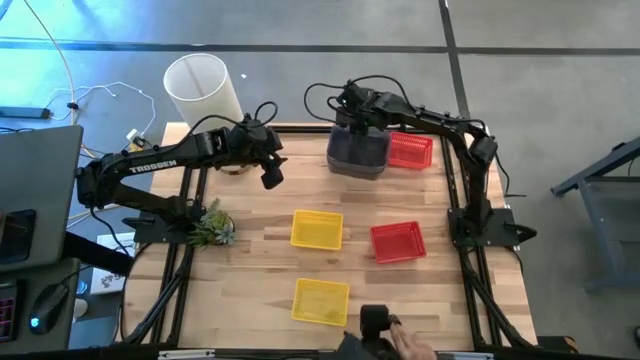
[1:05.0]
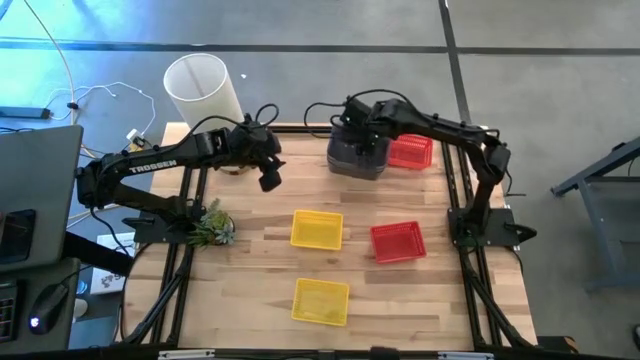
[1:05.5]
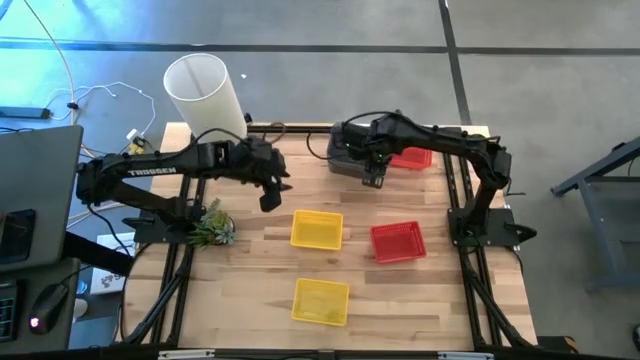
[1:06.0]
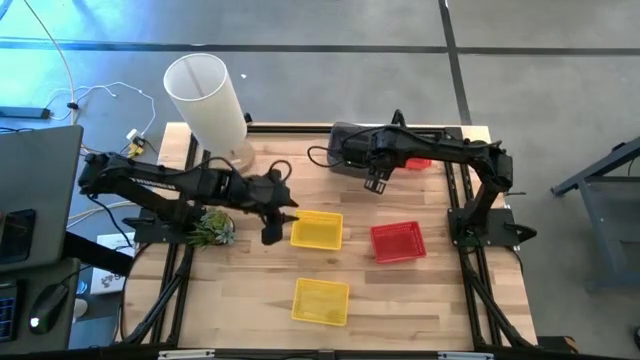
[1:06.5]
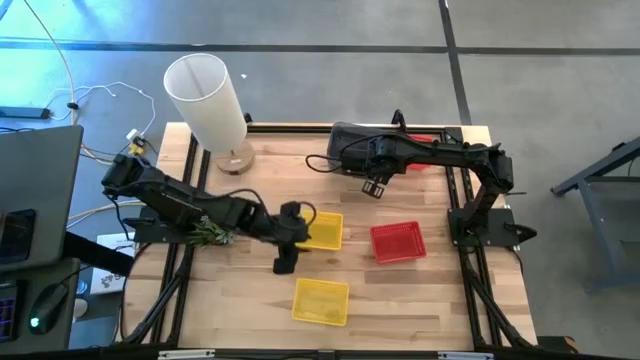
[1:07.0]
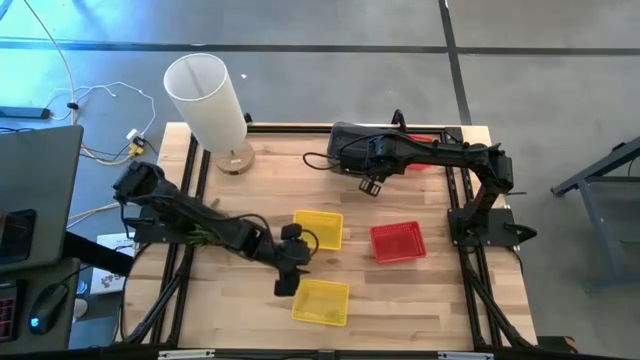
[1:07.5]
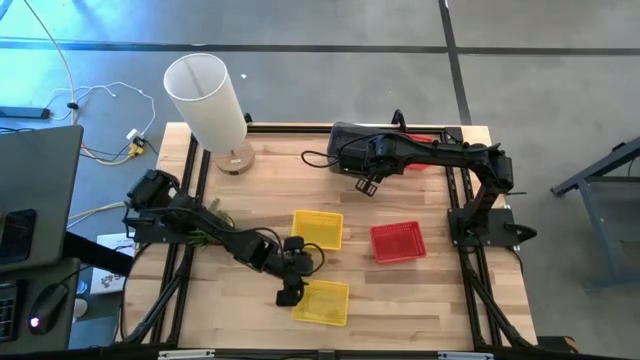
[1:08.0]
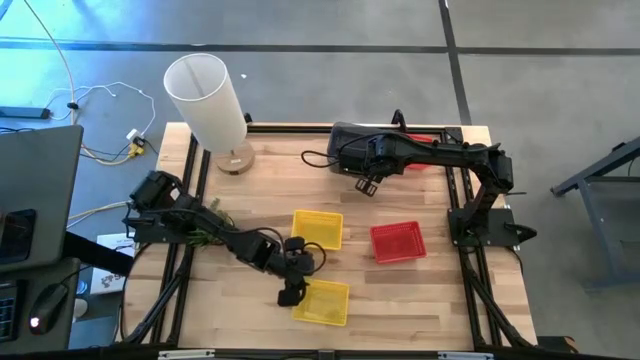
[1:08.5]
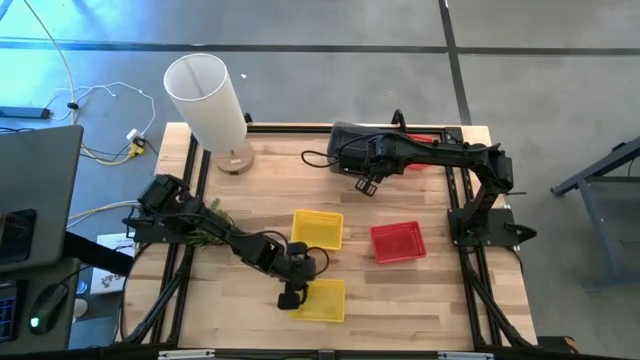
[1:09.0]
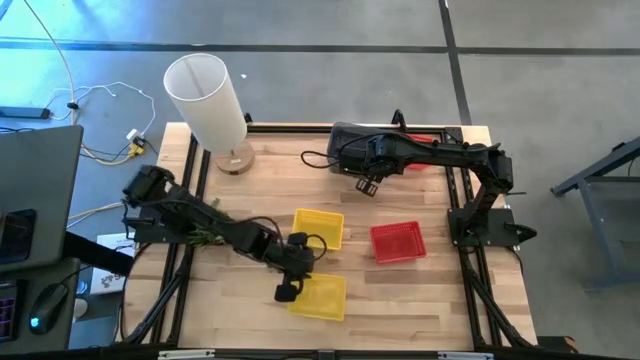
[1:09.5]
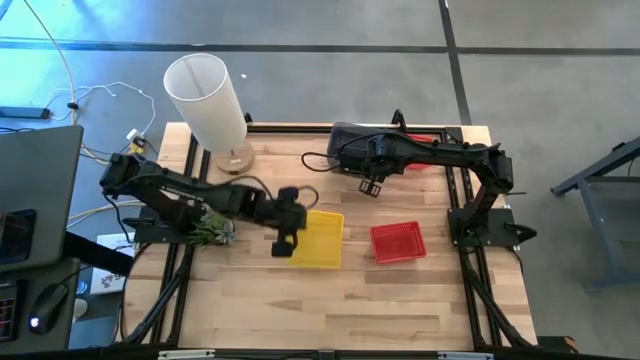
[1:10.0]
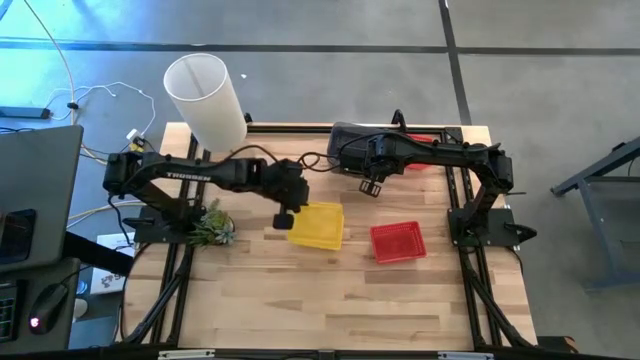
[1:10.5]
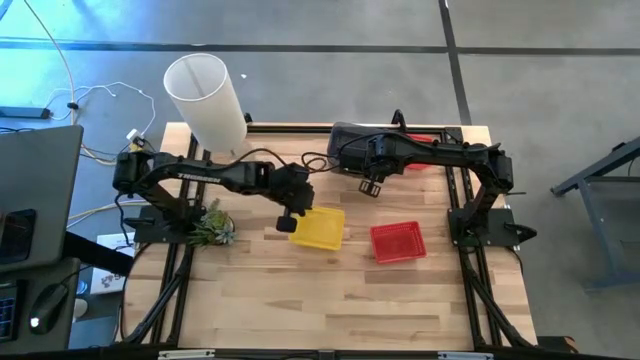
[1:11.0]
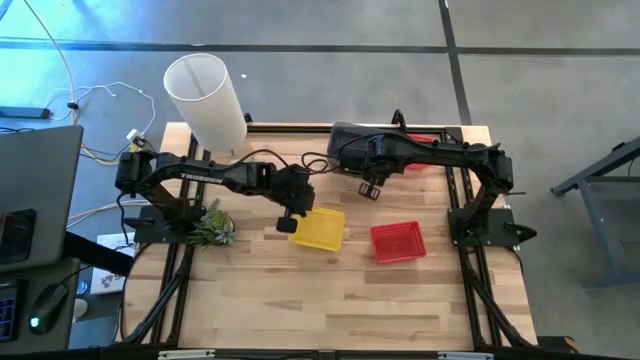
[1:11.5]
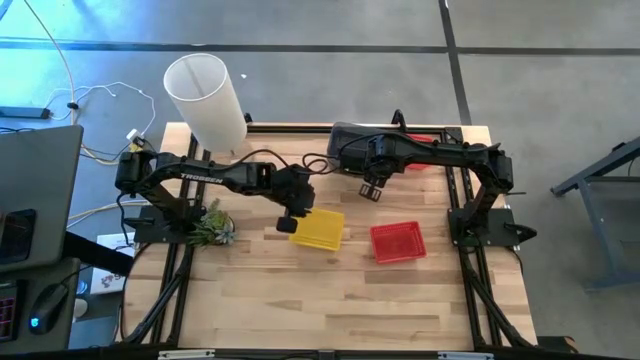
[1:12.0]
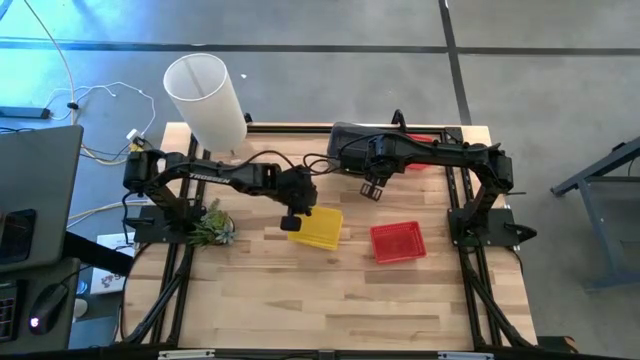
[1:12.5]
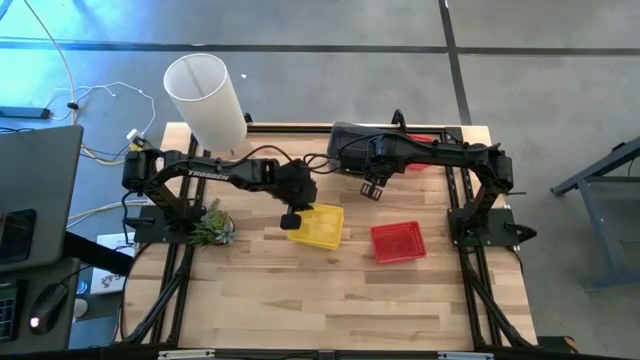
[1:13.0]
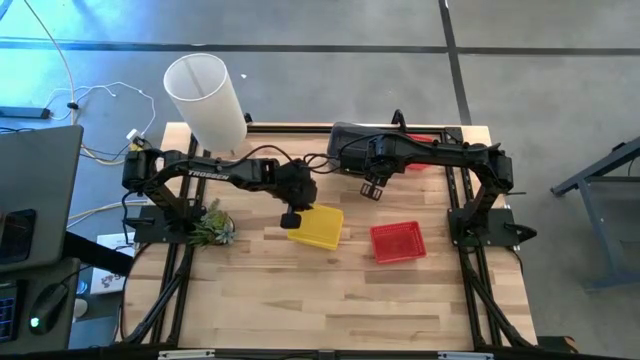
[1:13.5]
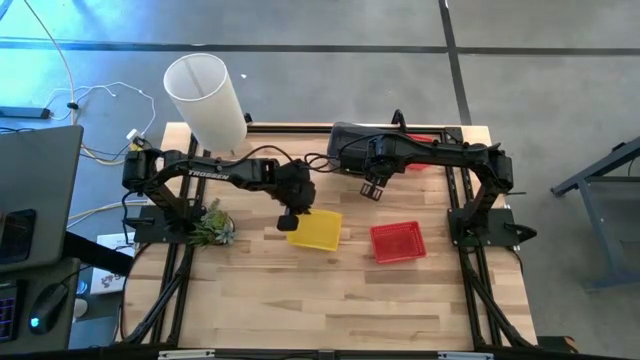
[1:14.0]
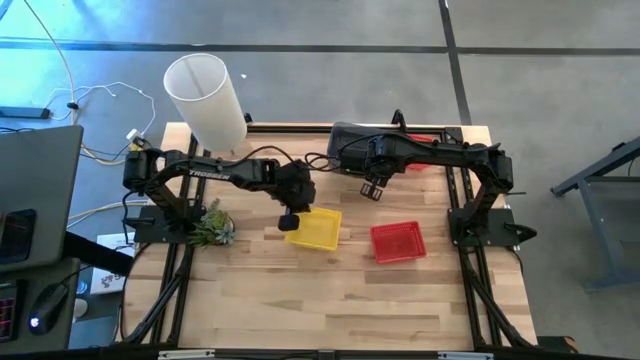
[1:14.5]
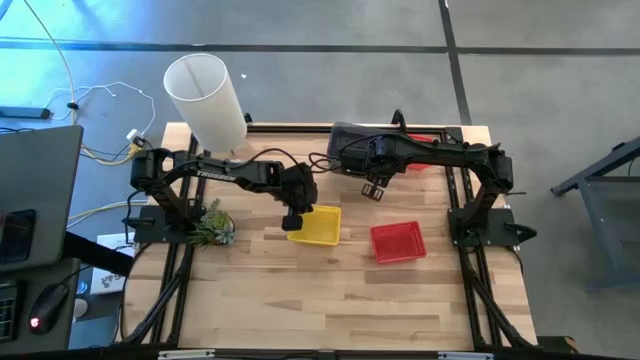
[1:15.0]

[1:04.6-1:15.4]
Stack the bottom yellow bin on the stacked yellow bin

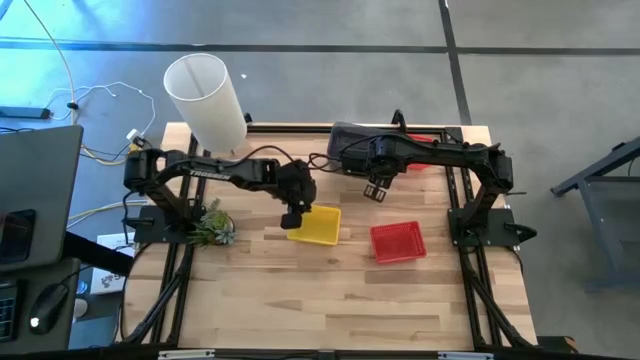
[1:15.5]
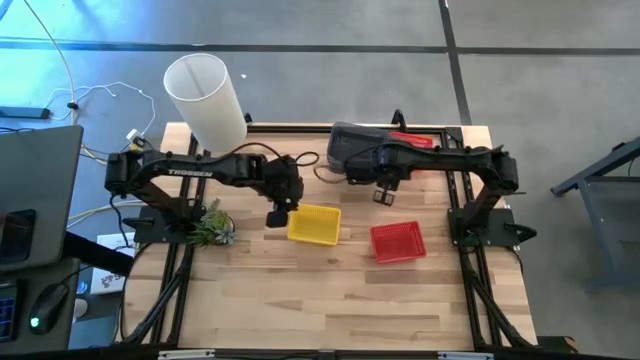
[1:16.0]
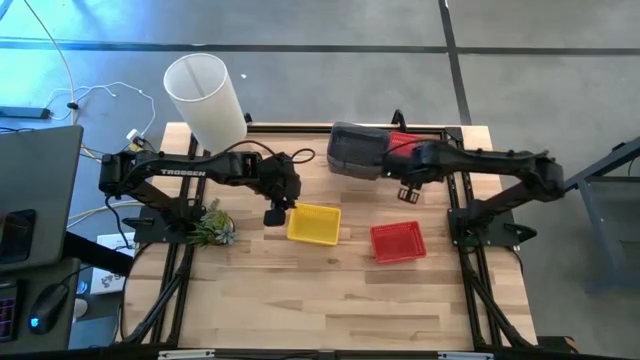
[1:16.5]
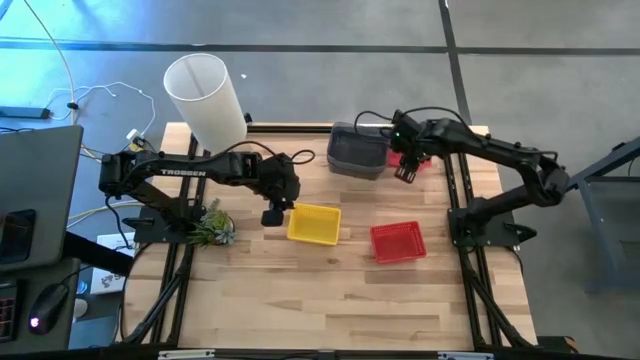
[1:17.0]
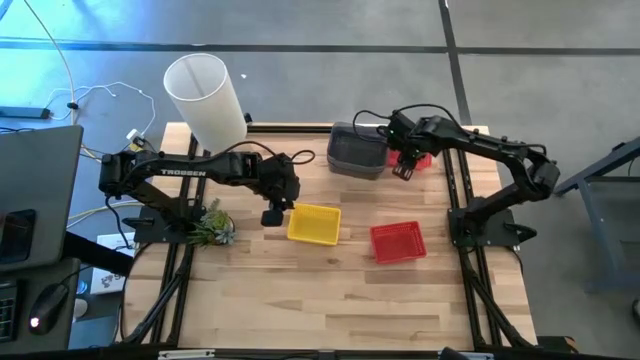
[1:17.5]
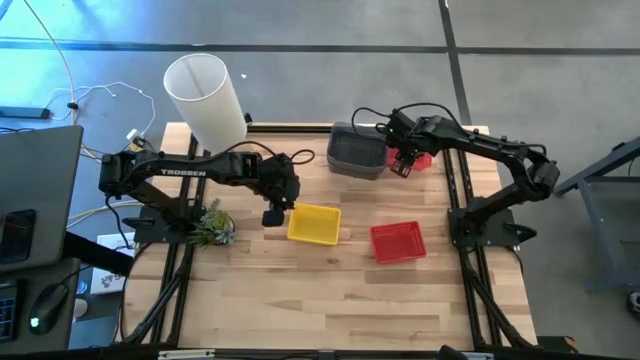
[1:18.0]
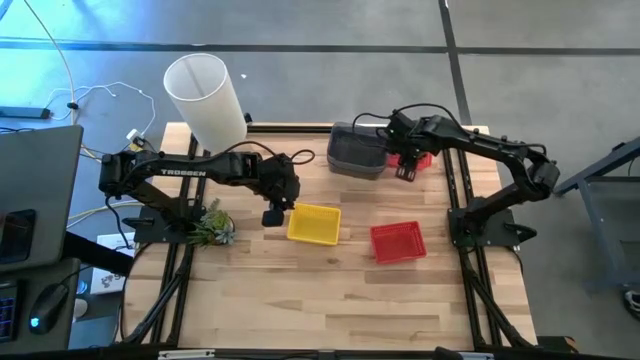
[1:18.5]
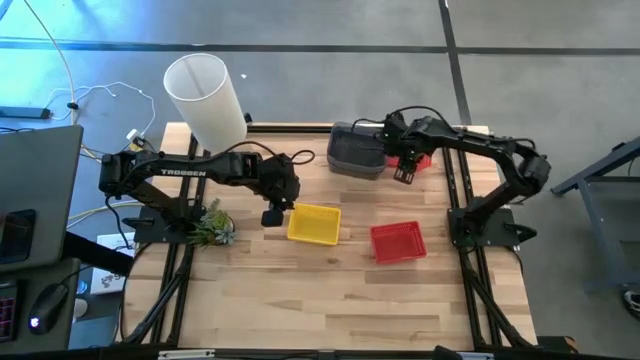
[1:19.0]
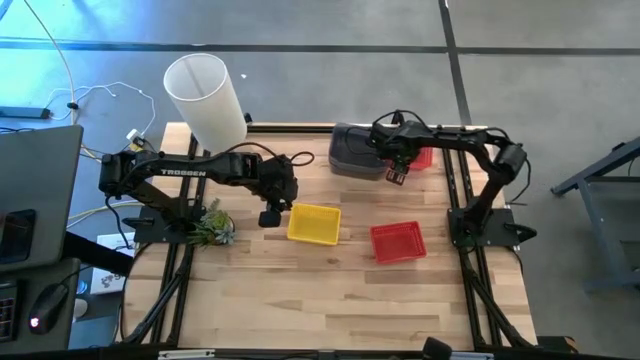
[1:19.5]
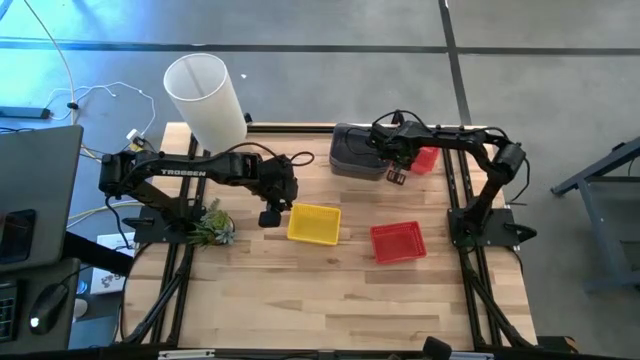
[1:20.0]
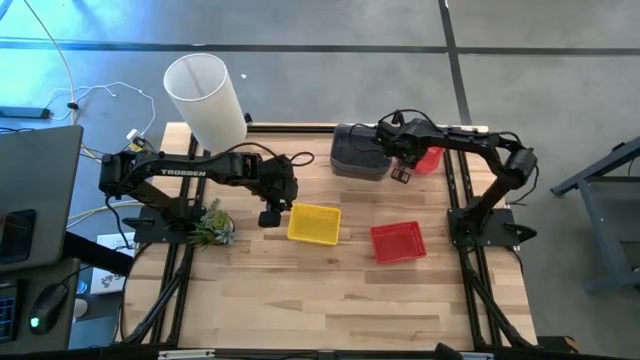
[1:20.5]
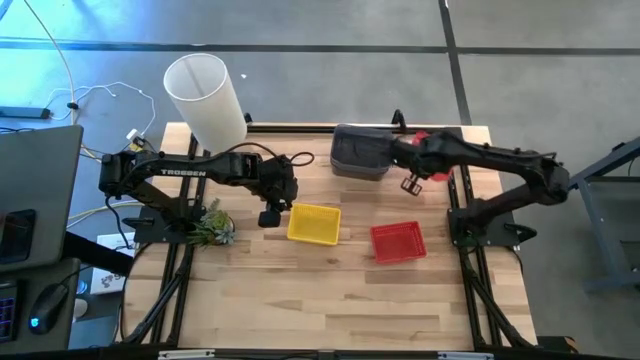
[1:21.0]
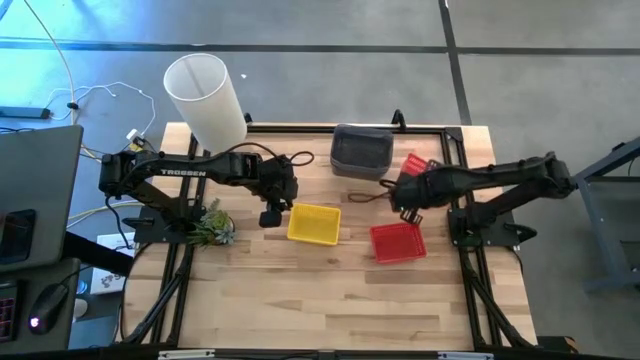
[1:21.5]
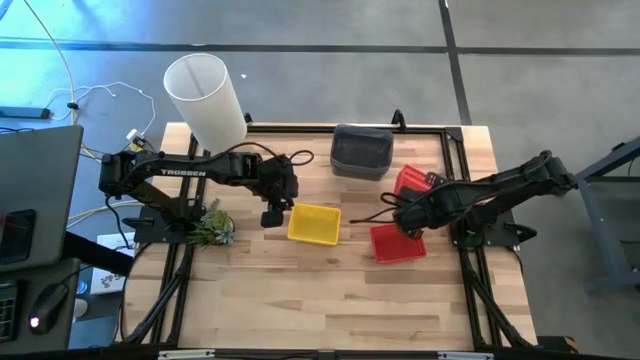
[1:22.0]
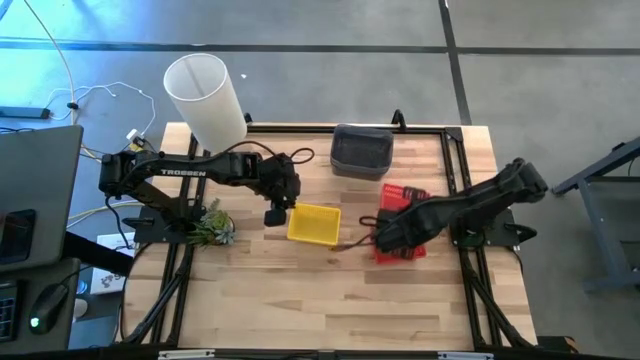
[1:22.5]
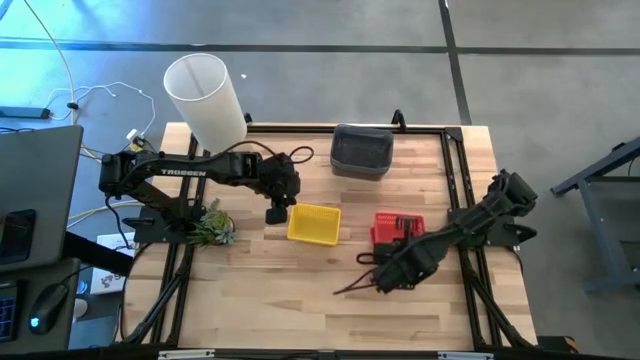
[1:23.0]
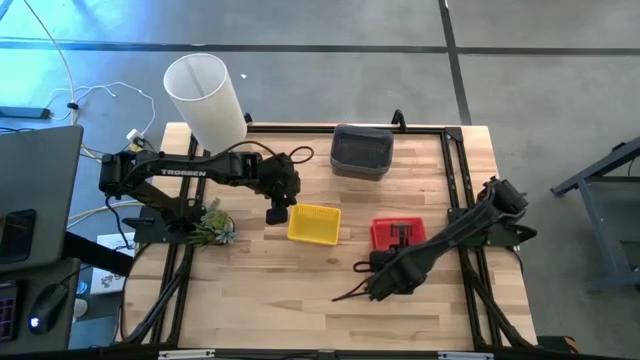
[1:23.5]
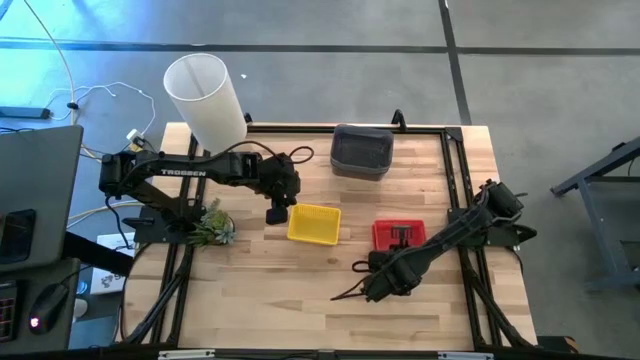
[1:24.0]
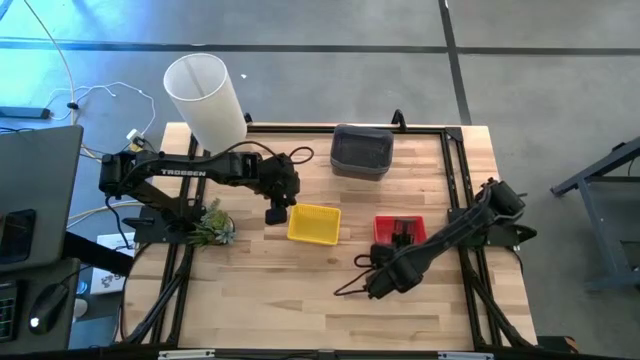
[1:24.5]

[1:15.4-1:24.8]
Stack the top red bin on the stacked red bin

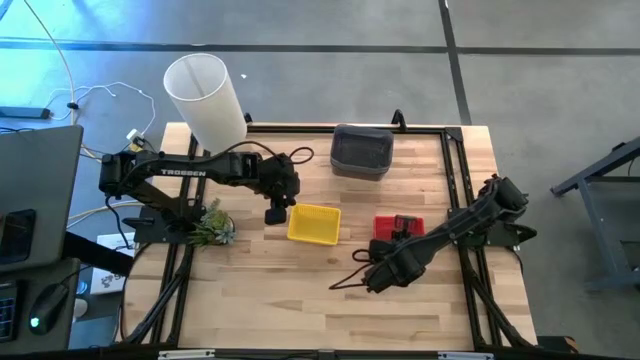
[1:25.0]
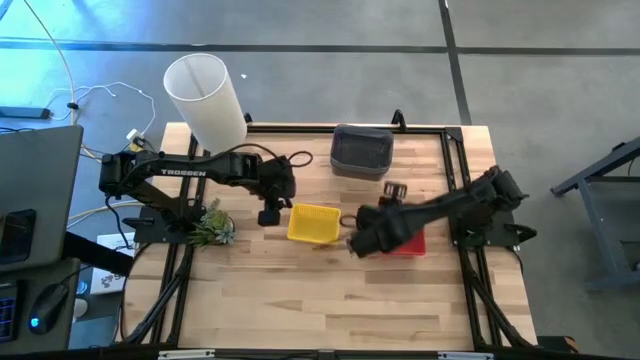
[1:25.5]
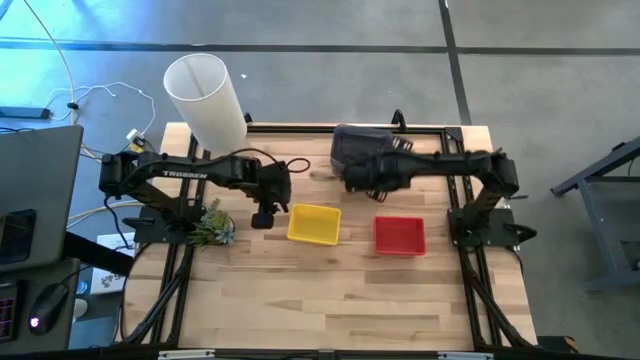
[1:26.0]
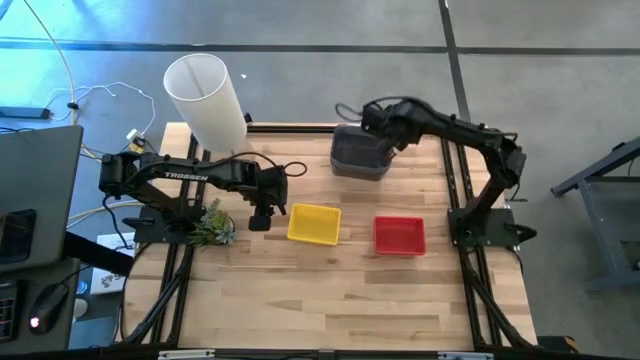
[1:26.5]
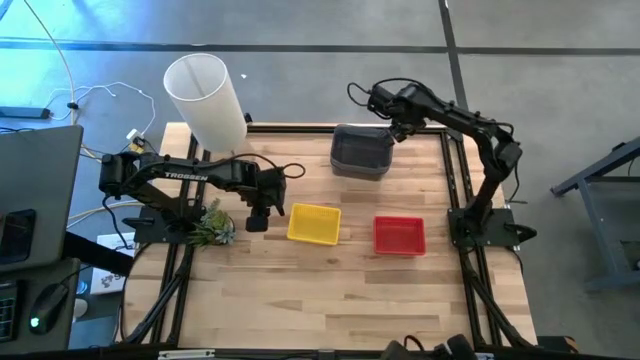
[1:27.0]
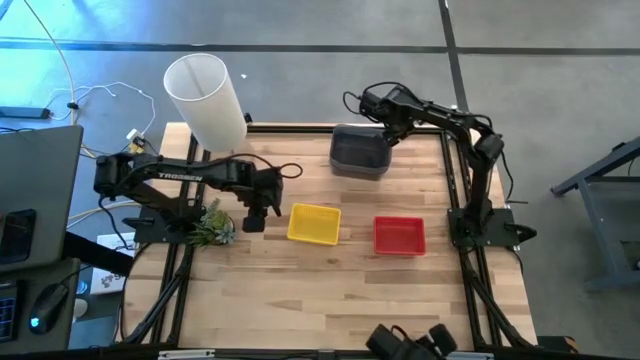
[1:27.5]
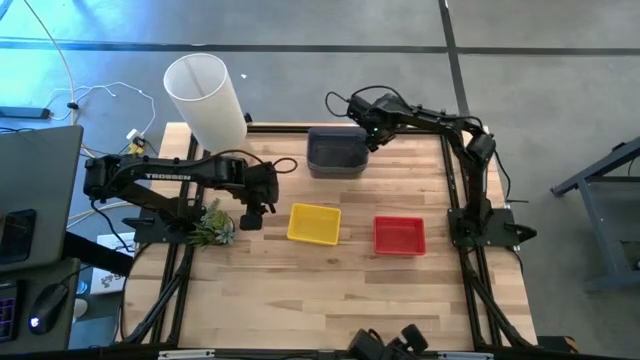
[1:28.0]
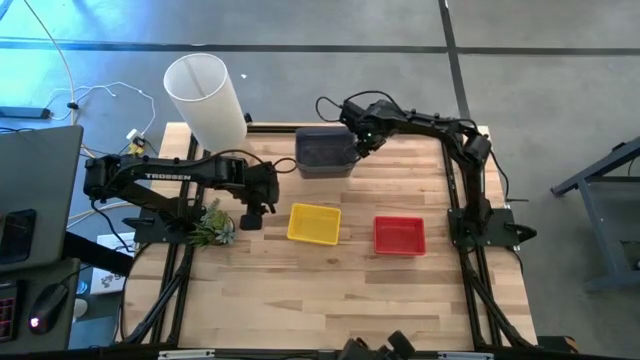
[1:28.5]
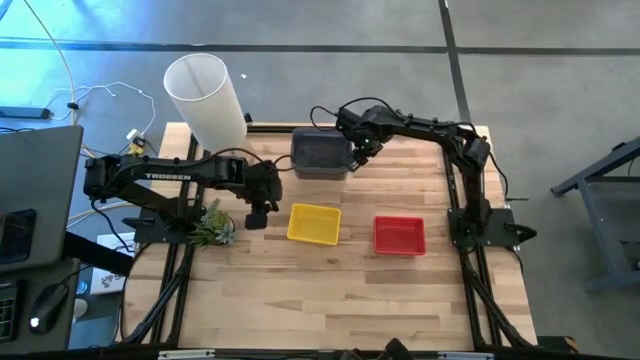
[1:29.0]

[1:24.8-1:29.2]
Move the stacked black bin to the top center of the table
